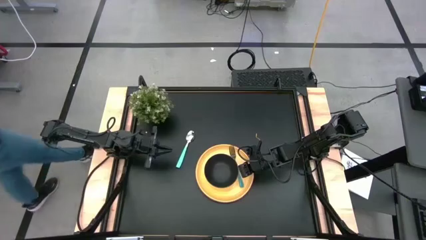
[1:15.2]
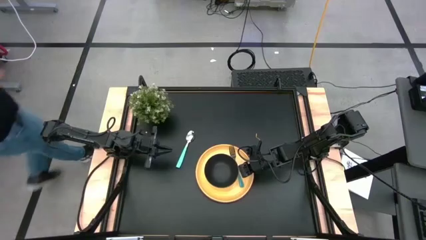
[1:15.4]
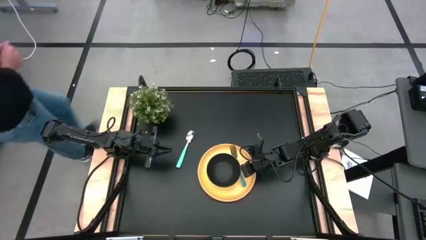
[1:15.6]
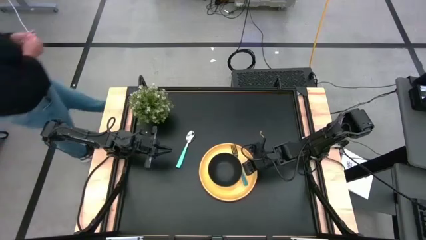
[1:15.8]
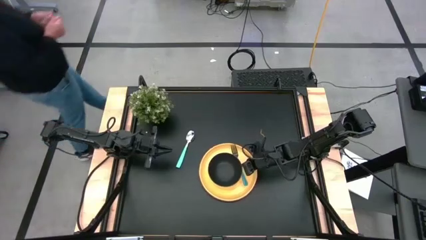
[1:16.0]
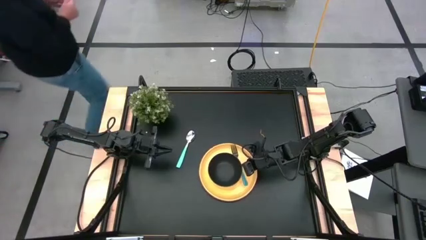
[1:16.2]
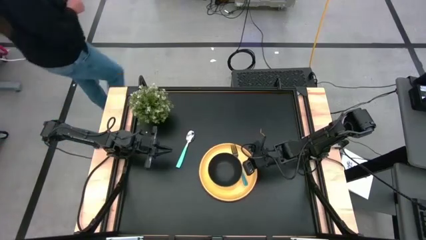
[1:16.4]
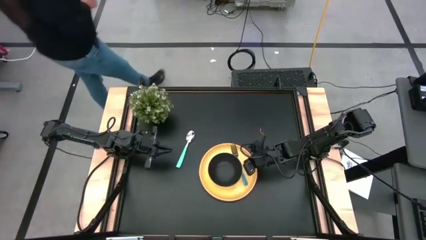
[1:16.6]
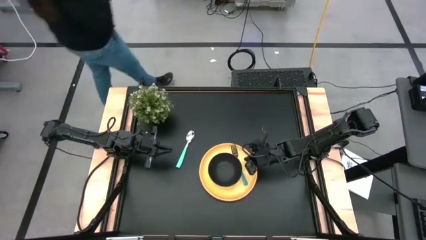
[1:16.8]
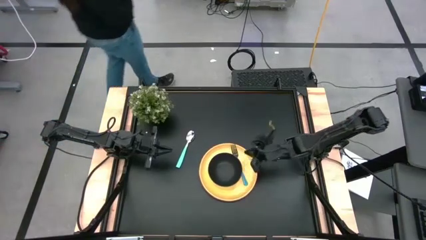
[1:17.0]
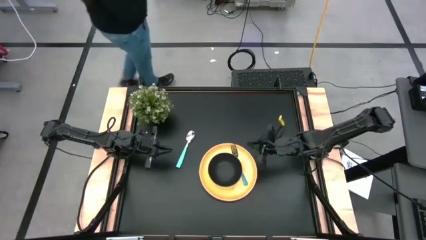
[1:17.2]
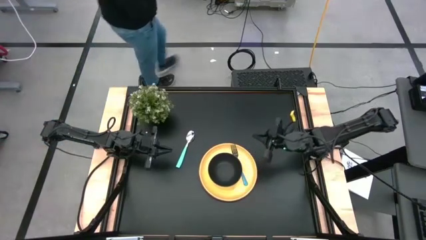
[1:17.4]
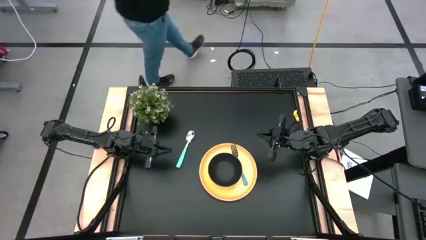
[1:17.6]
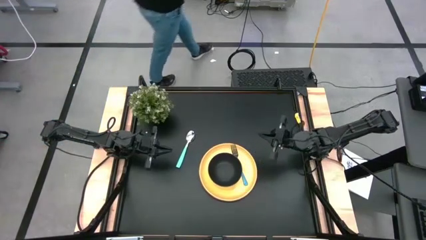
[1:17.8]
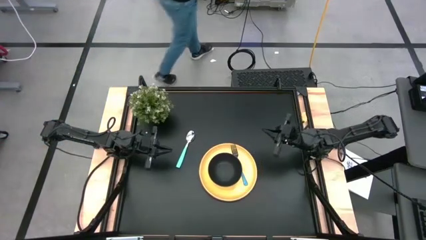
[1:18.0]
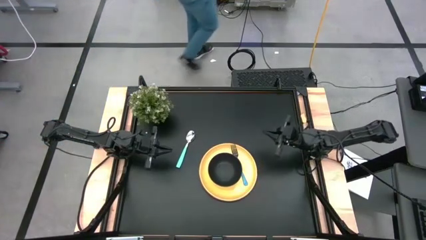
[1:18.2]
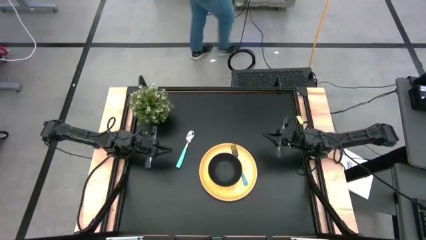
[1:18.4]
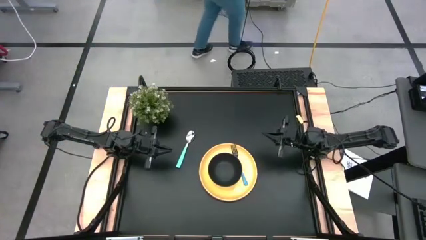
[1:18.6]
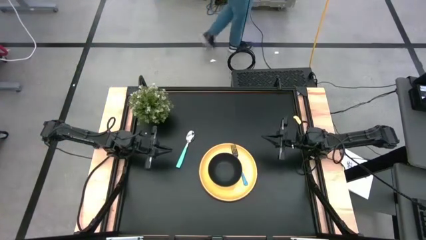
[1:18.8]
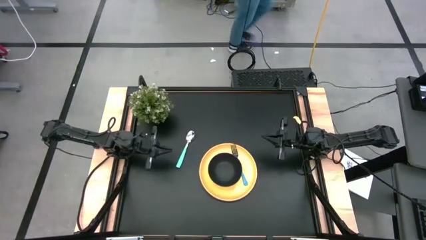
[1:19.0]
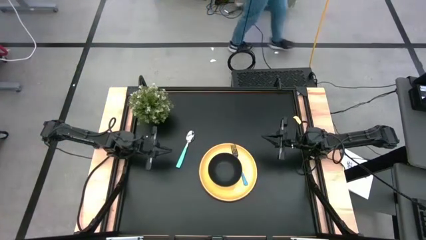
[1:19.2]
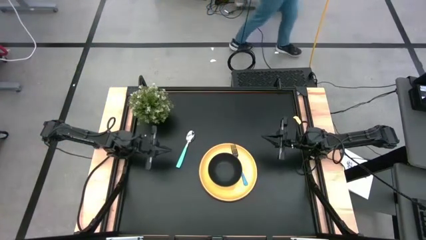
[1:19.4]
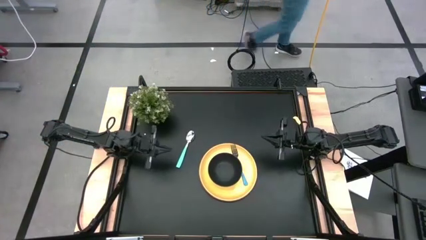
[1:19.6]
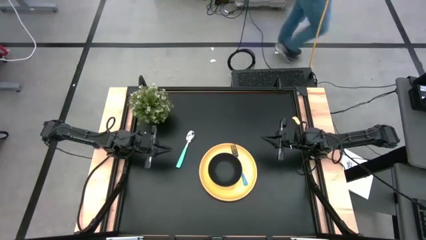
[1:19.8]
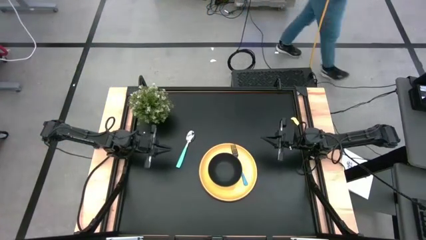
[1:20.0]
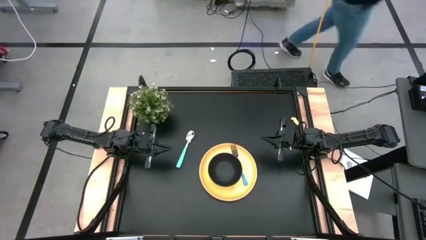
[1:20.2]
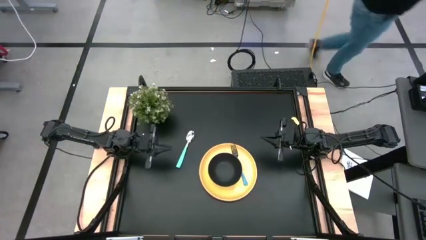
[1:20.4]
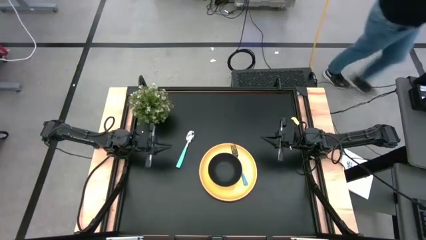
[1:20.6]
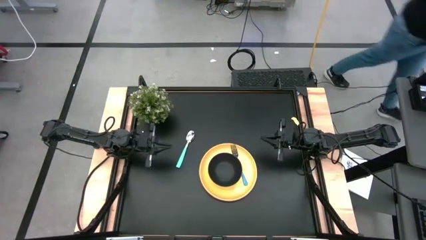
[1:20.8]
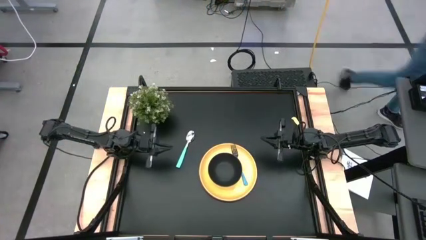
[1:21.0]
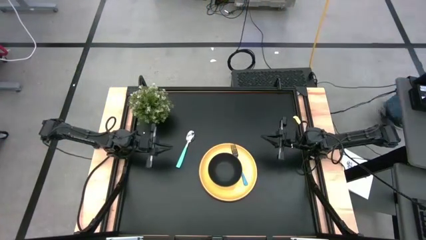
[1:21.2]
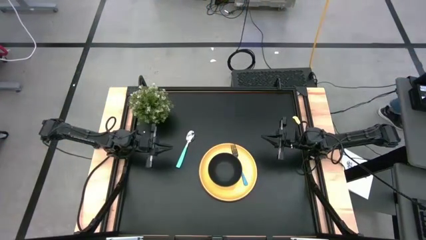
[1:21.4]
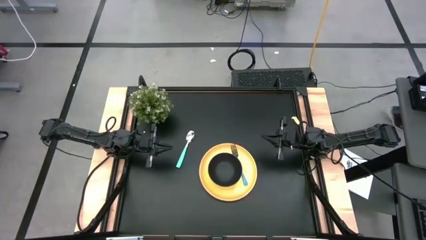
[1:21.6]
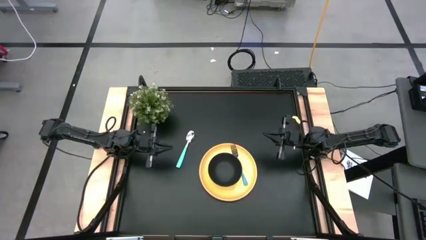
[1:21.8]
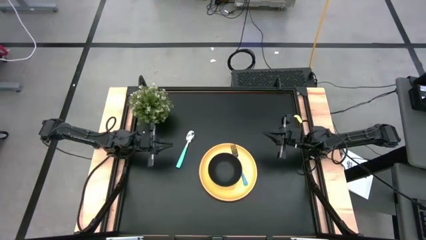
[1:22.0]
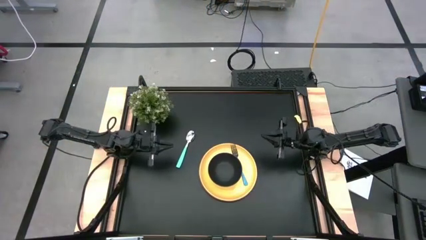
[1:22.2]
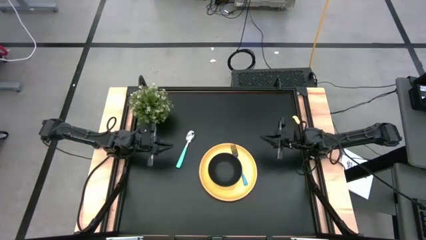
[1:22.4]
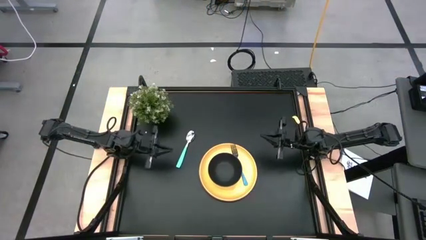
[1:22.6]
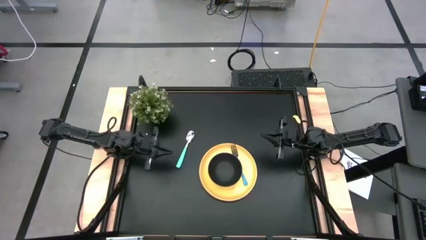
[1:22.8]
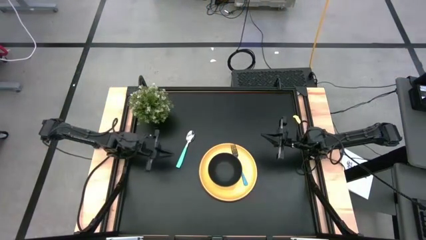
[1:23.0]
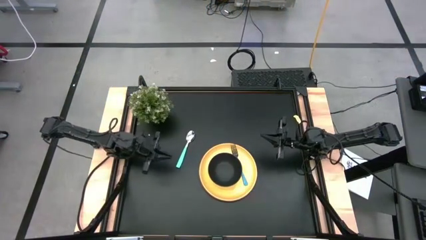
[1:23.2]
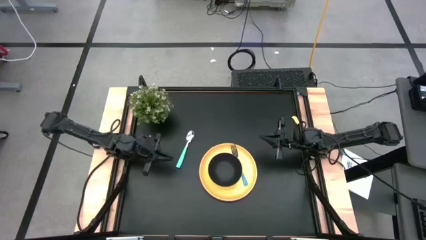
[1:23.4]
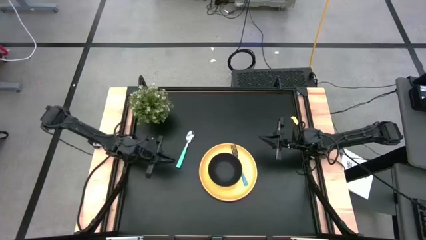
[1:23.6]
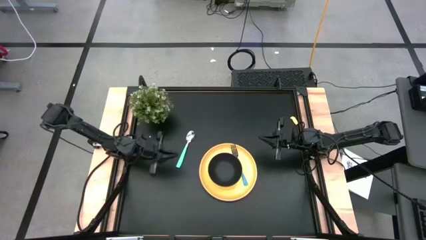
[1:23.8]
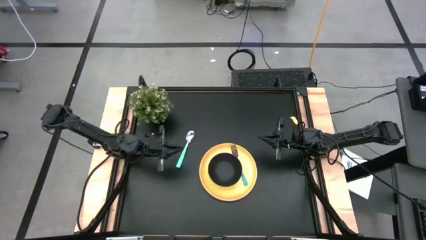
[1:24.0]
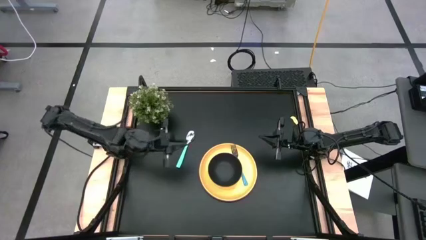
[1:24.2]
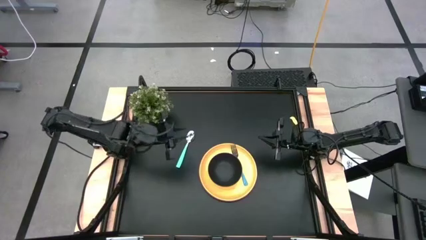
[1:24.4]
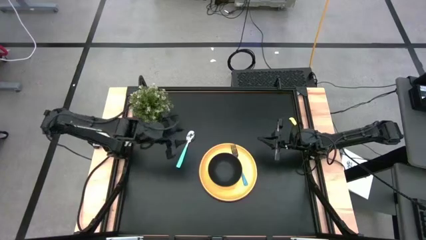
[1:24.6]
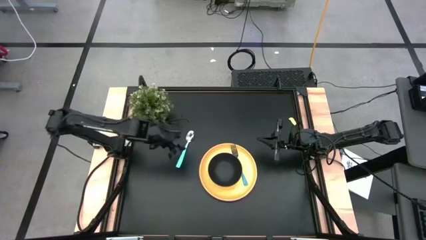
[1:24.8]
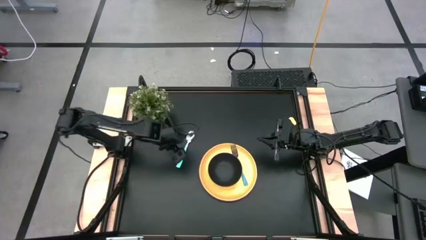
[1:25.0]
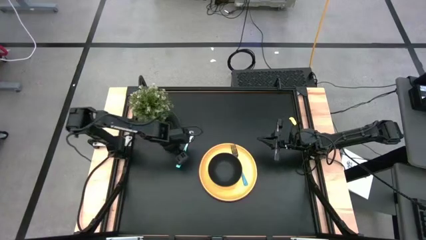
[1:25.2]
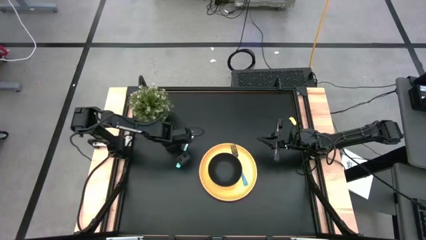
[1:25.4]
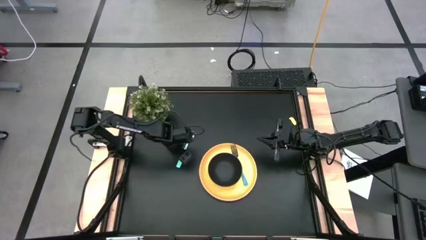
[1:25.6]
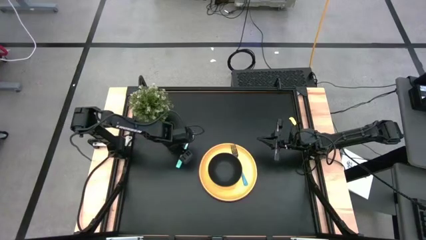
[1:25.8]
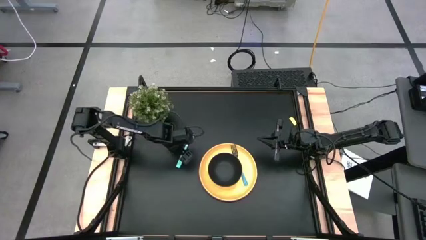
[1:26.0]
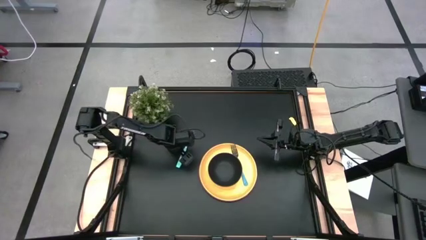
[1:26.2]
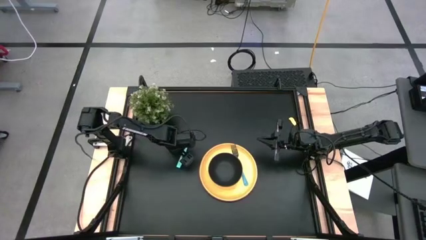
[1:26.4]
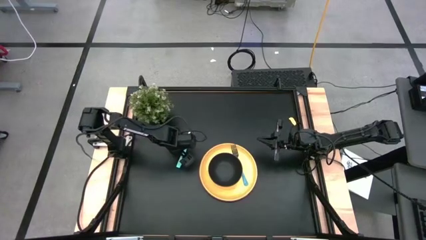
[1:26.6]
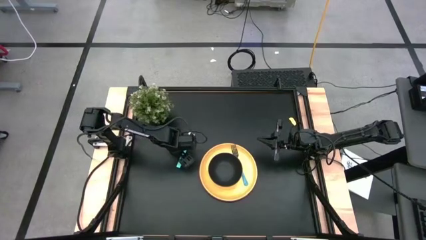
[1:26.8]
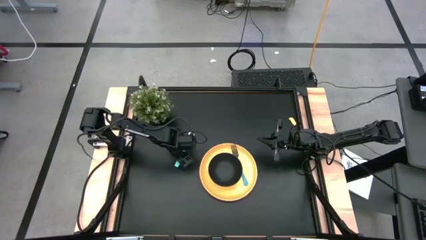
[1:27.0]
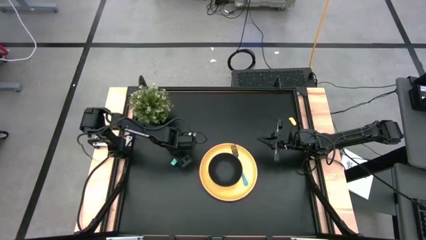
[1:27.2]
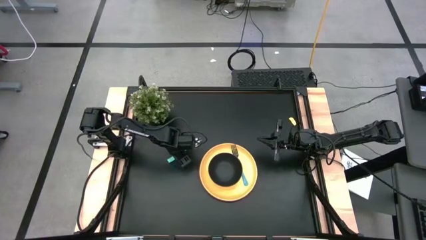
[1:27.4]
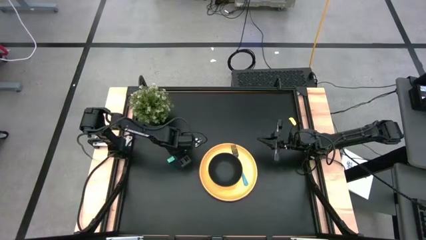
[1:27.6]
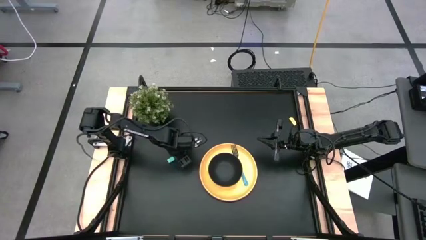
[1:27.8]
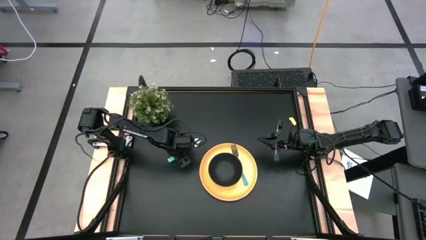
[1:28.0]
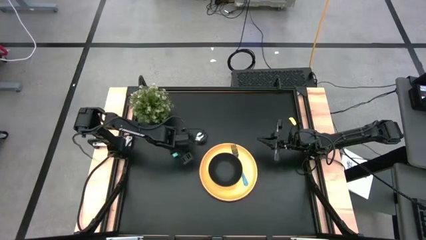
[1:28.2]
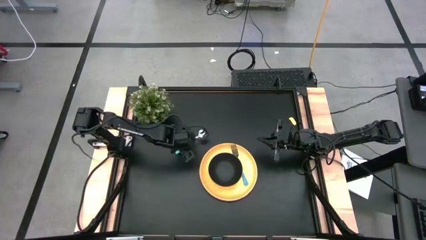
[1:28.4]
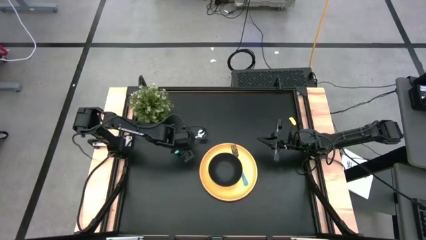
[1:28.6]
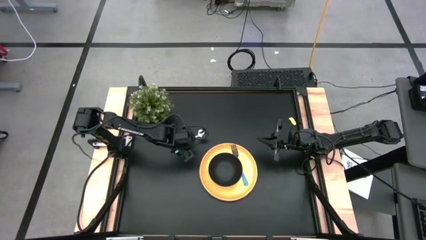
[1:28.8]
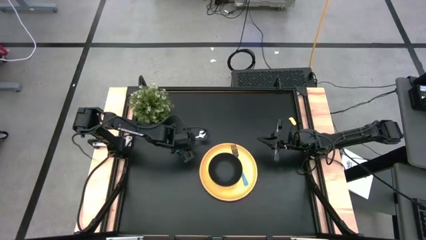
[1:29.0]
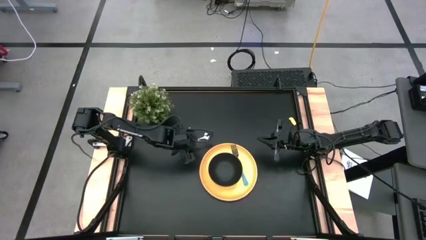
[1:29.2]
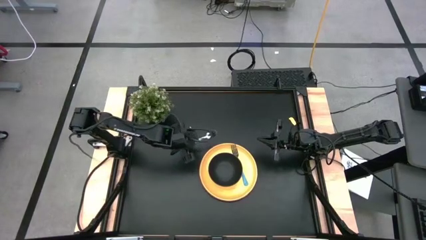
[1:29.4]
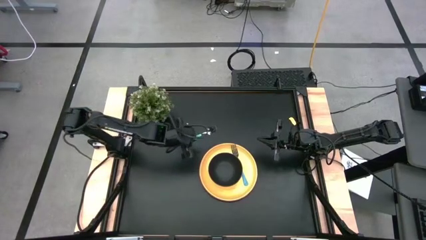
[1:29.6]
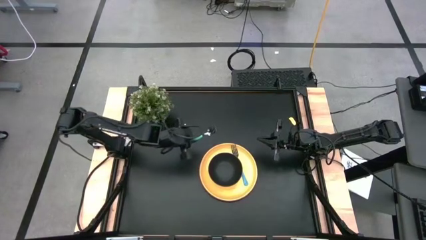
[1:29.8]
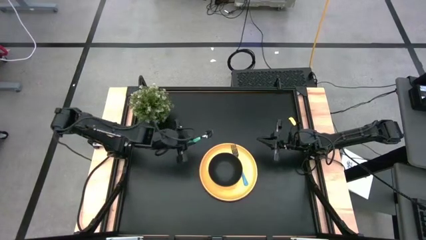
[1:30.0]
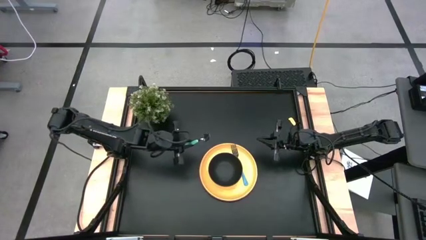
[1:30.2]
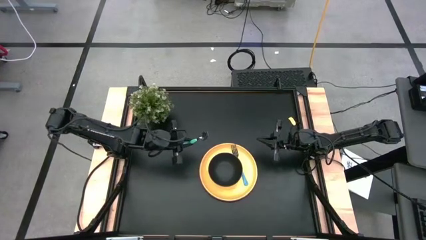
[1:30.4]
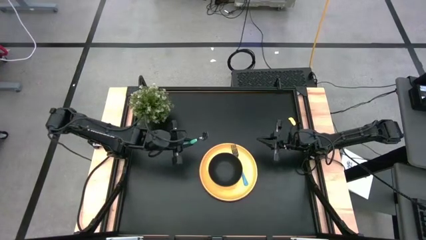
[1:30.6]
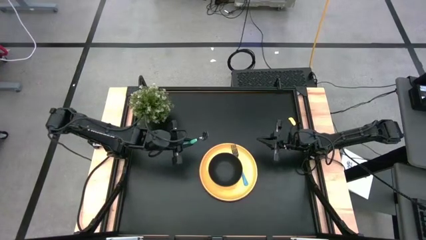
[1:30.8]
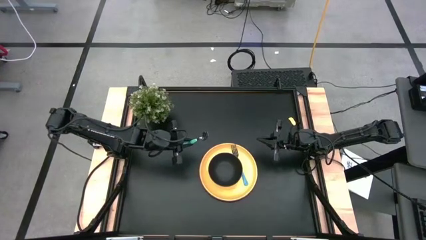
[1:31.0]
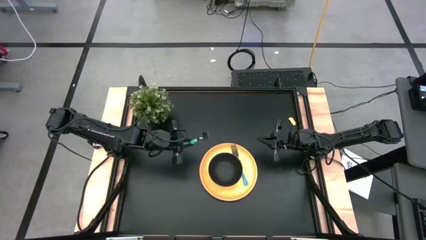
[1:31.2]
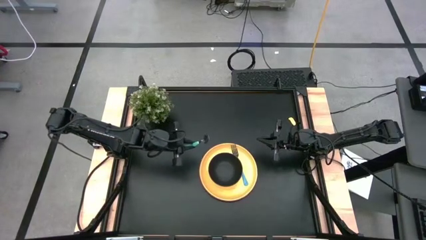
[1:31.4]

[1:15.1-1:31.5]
Task: Set table place
Put the blue spoon on the black bowl
